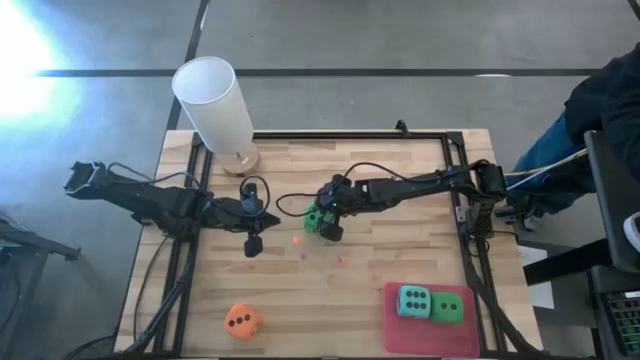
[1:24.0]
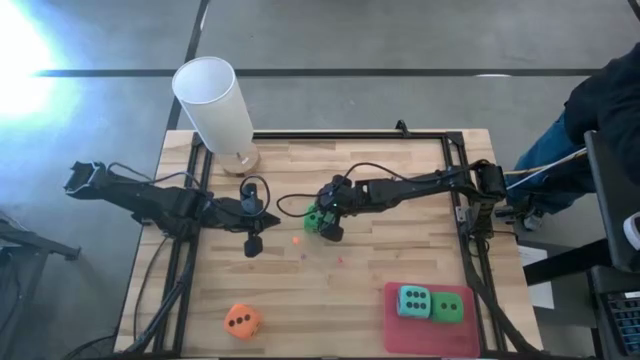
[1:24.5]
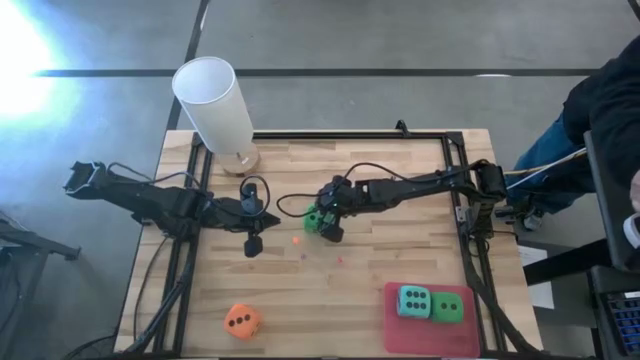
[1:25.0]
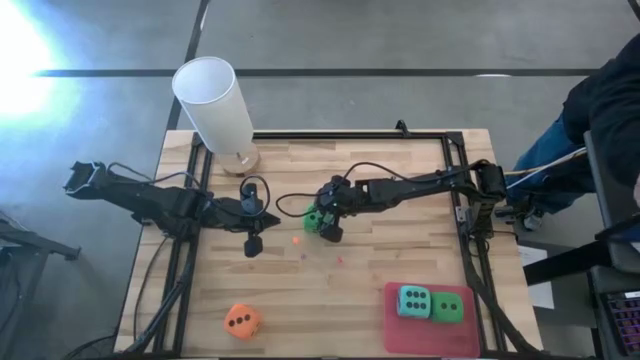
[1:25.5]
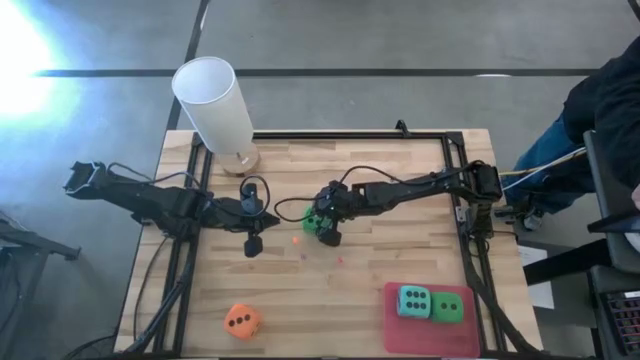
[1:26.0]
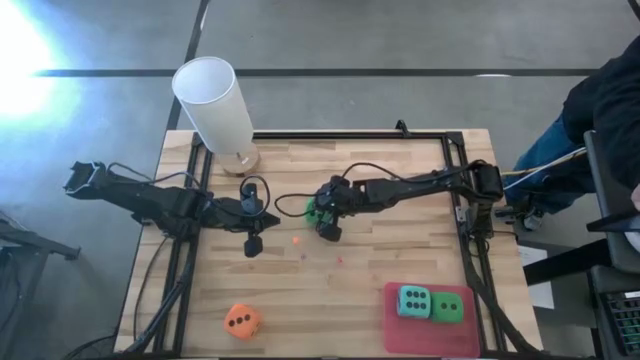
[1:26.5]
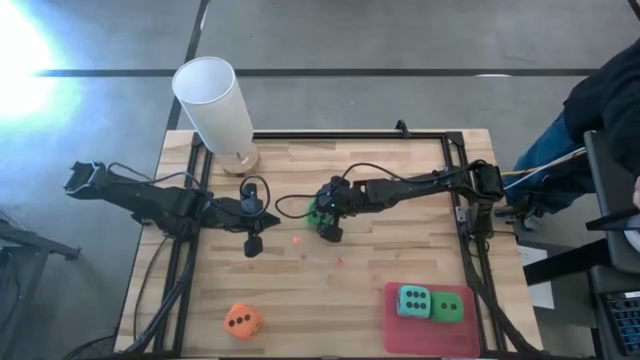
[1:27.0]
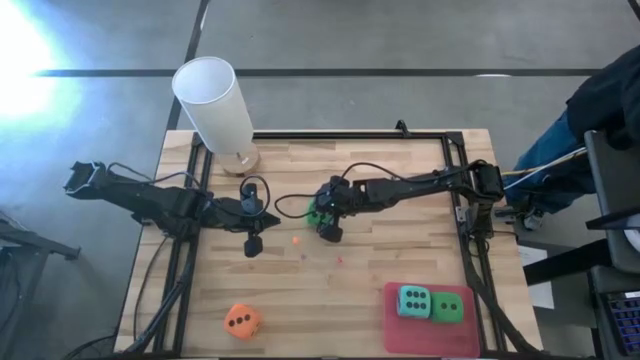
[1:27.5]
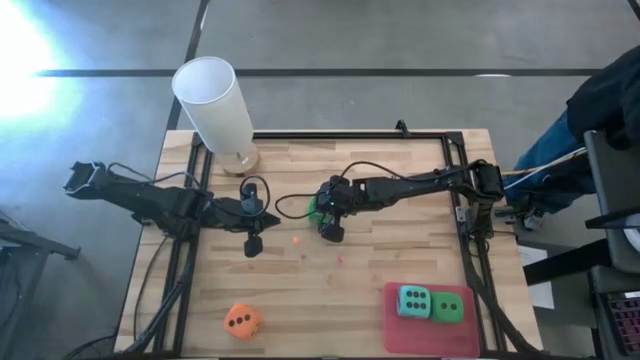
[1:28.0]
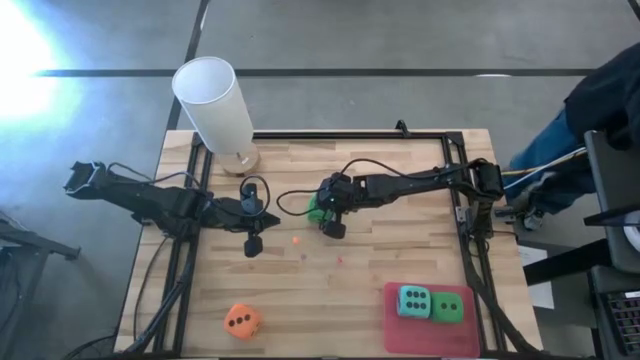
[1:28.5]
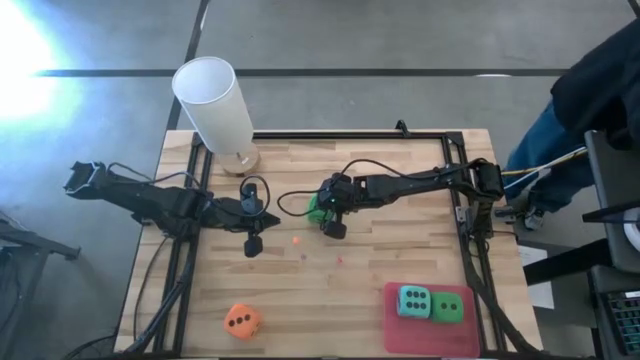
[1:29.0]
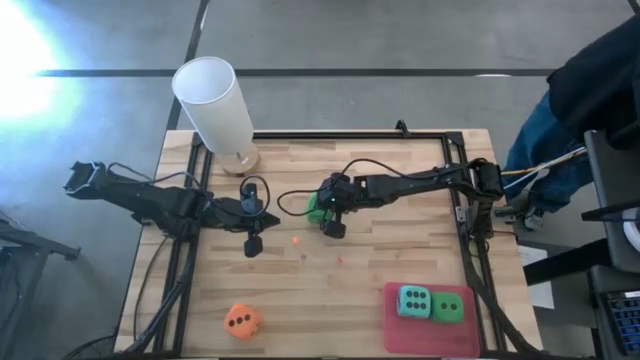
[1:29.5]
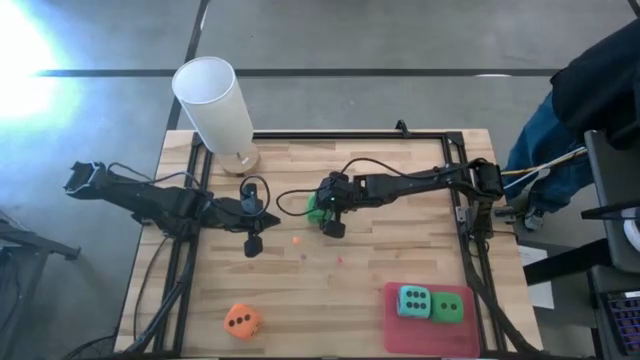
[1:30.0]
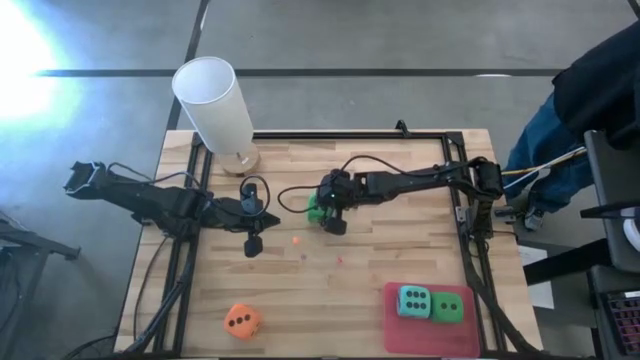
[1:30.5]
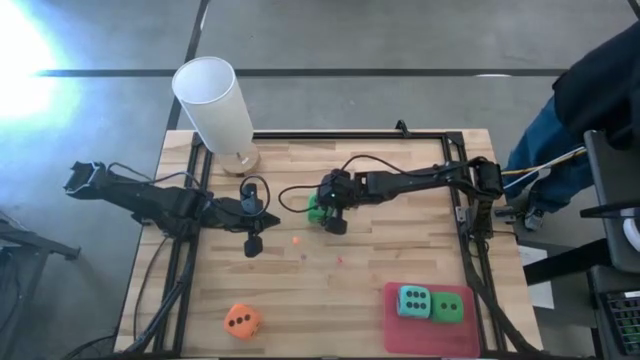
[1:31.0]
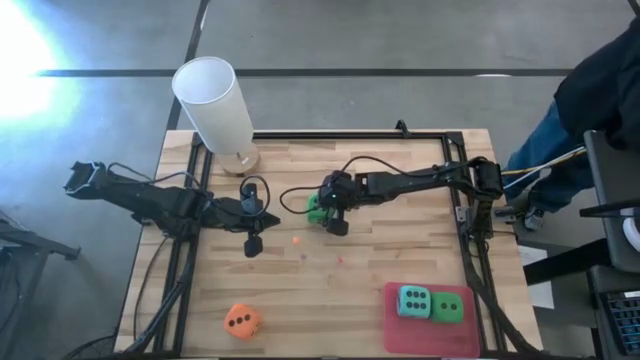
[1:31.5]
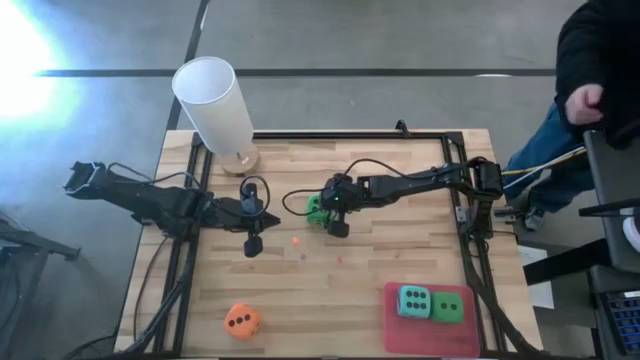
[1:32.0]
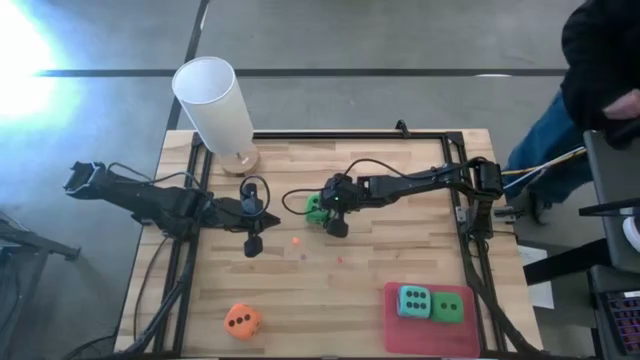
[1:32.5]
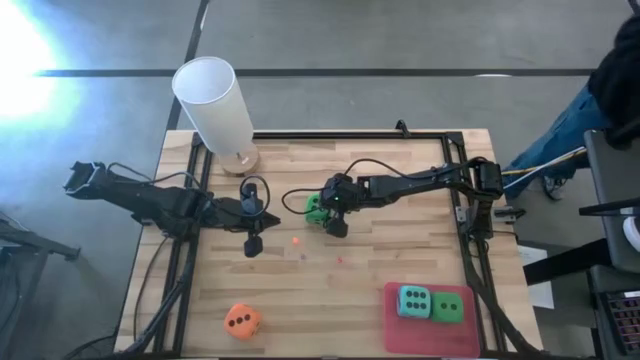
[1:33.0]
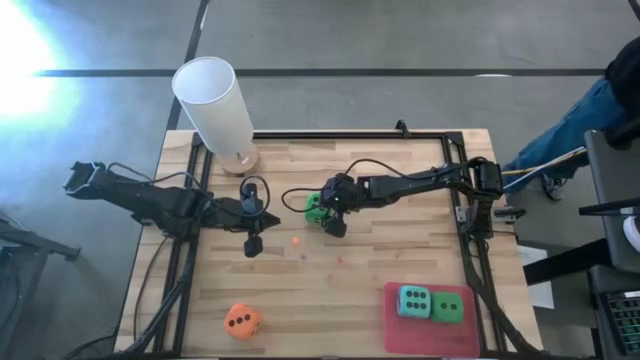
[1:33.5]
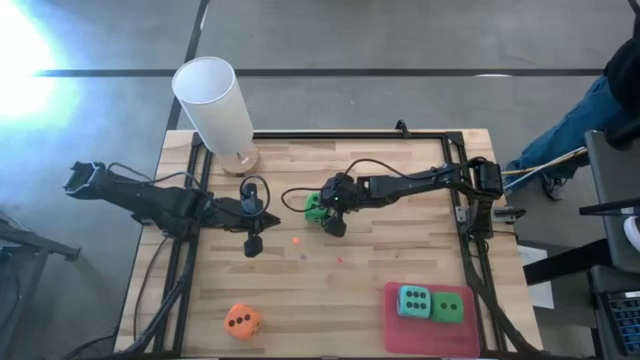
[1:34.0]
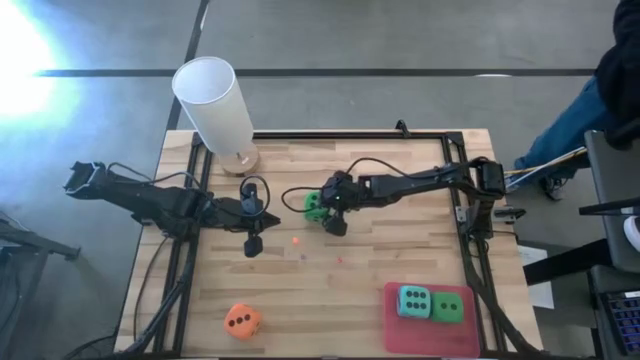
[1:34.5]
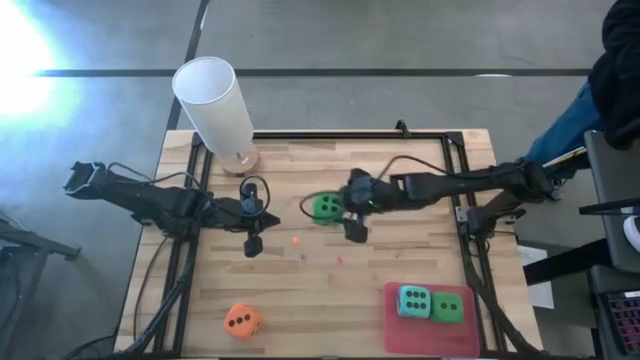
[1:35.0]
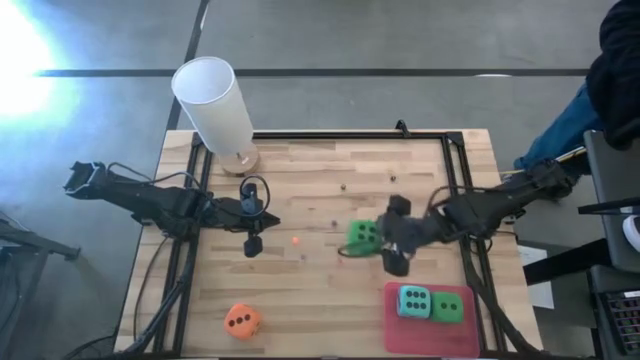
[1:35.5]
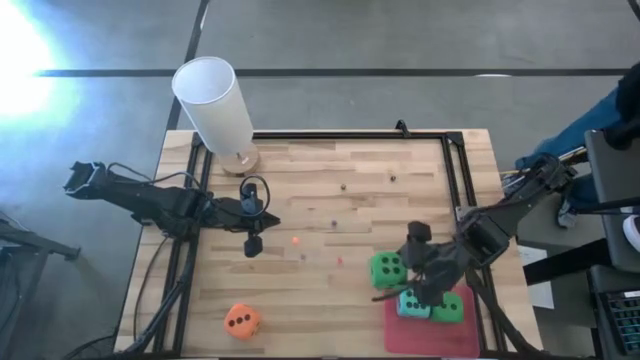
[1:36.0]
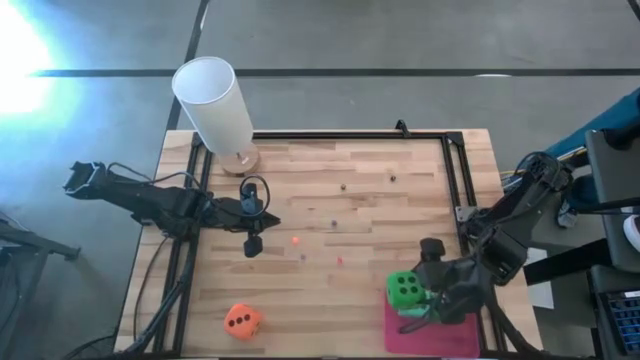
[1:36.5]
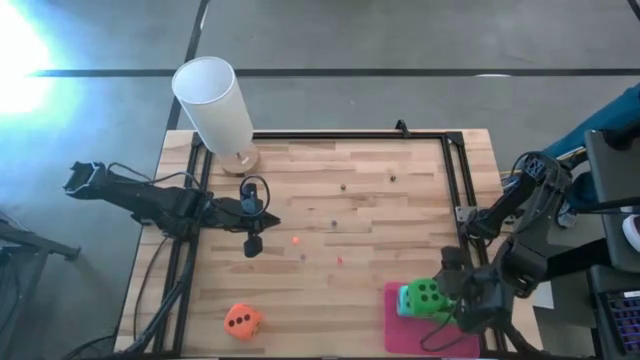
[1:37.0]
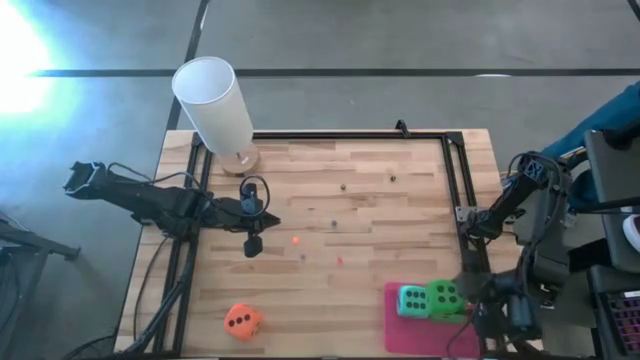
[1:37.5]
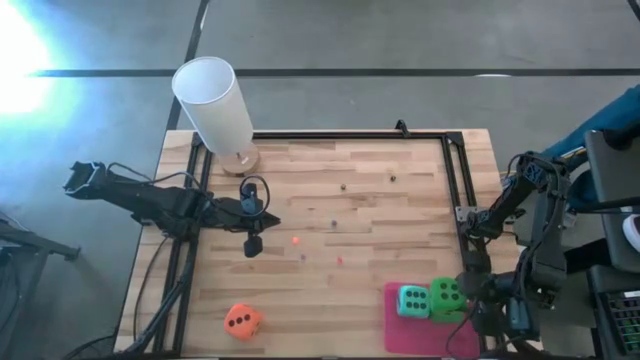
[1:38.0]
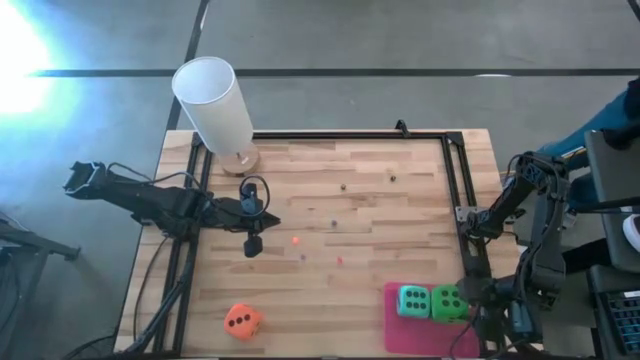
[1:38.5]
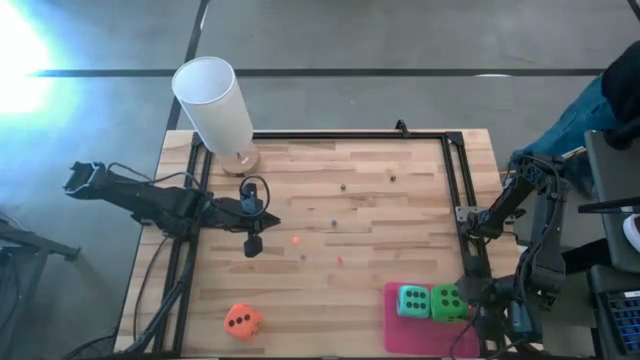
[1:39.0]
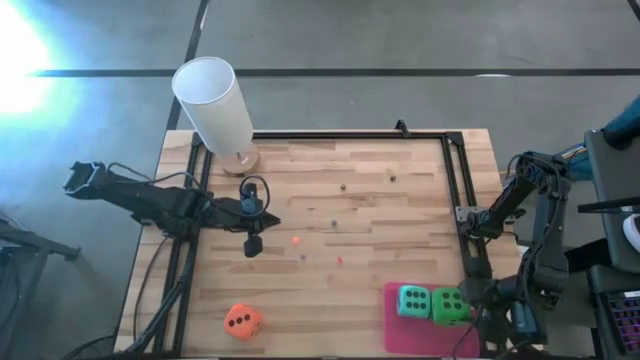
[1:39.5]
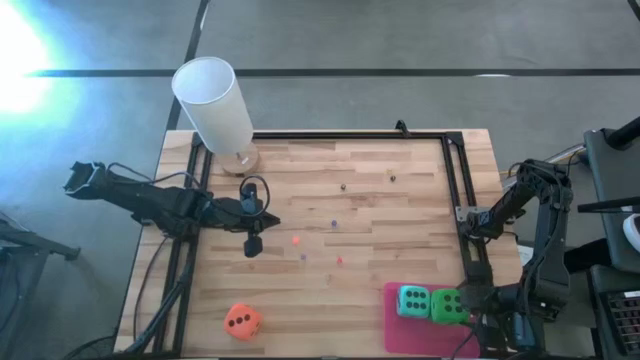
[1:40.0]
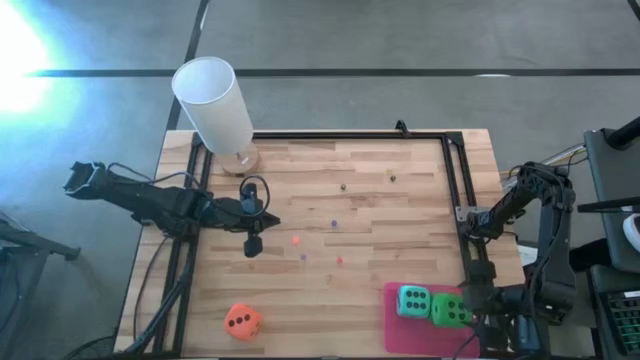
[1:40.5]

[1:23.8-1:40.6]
Task: Pick & Place Dice
Put the large green die into the bin

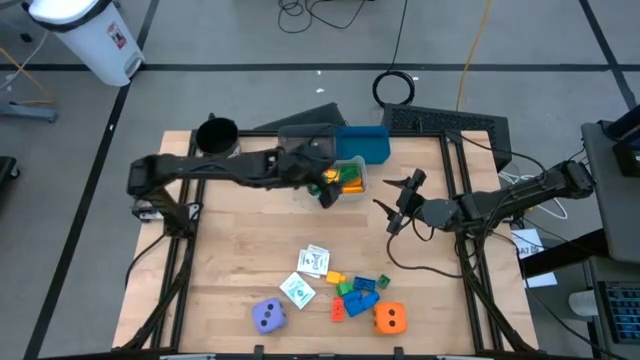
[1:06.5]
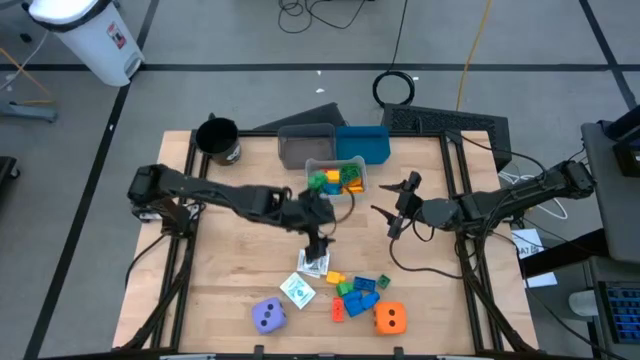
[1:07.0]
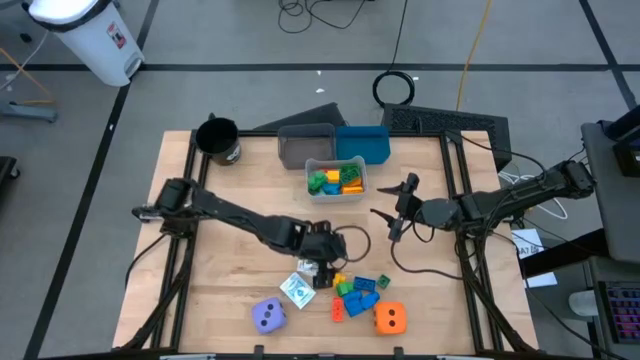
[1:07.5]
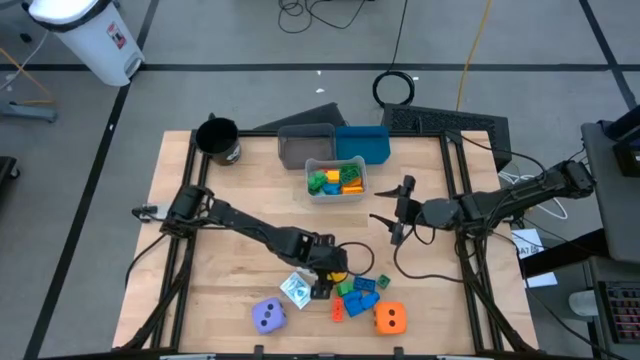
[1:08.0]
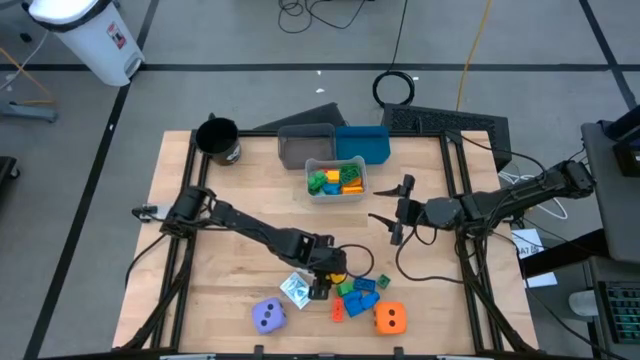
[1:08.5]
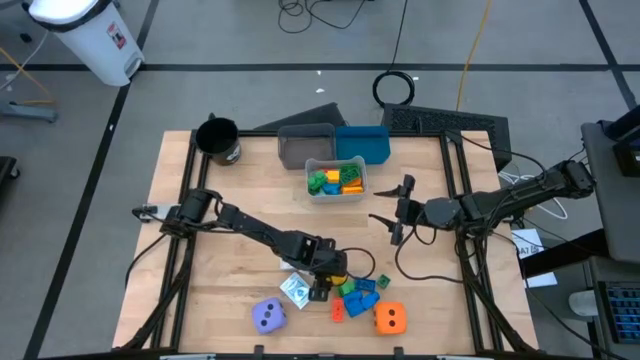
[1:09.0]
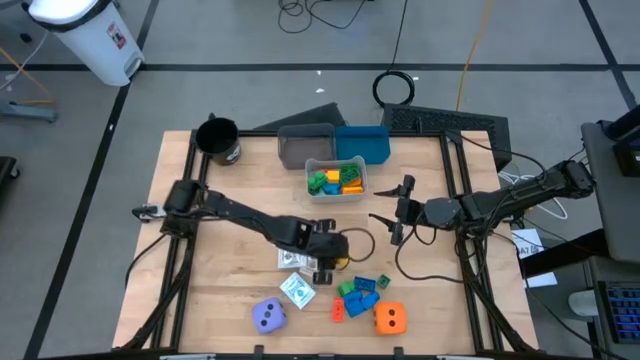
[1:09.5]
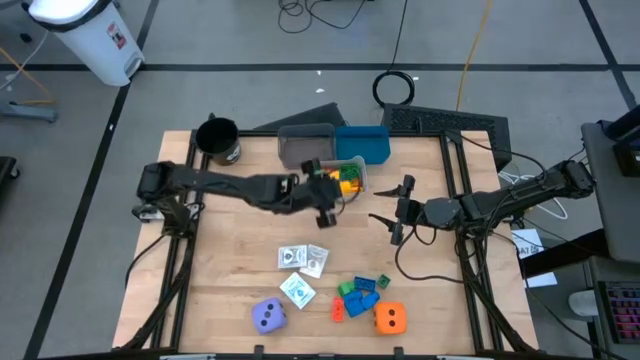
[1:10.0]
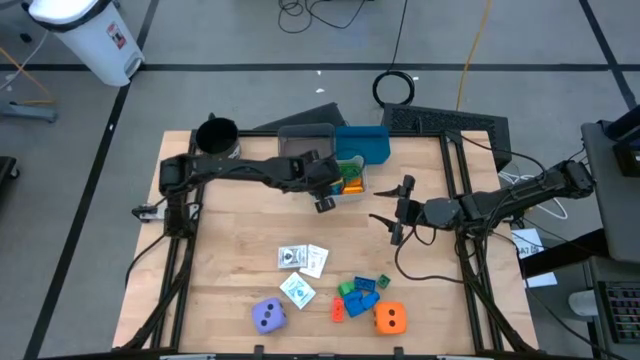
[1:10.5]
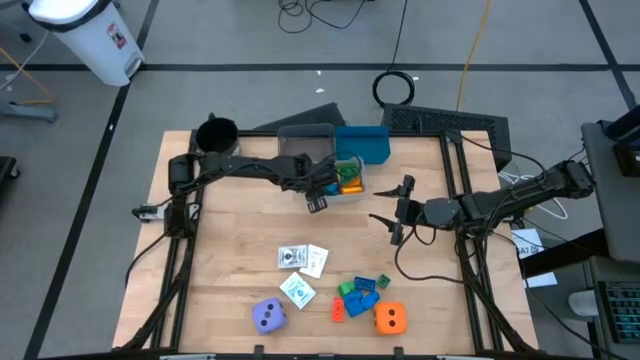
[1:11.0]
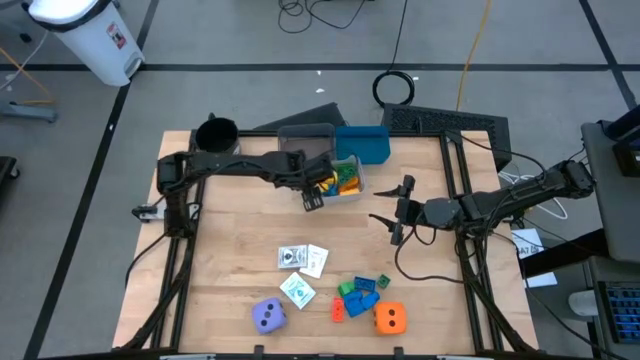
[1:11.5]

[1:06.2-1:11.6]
Task: Pick & Place Toys
Put the yellow game piece into the gray bin
